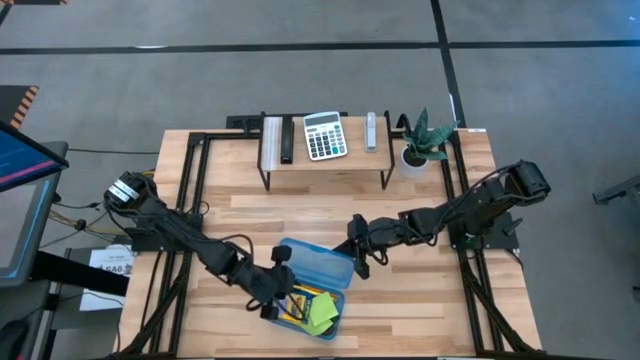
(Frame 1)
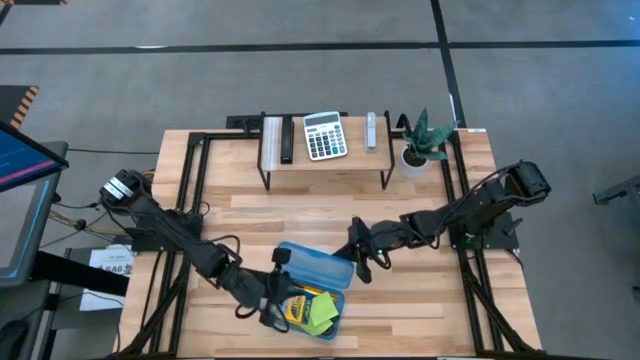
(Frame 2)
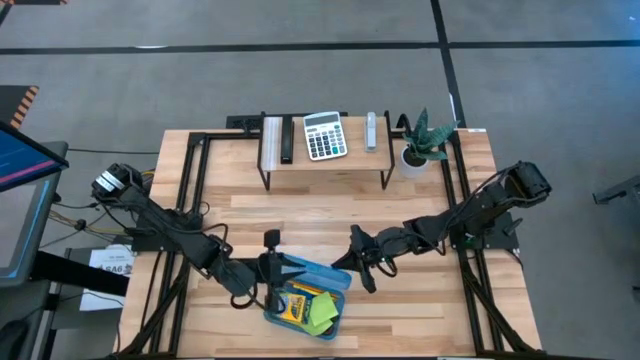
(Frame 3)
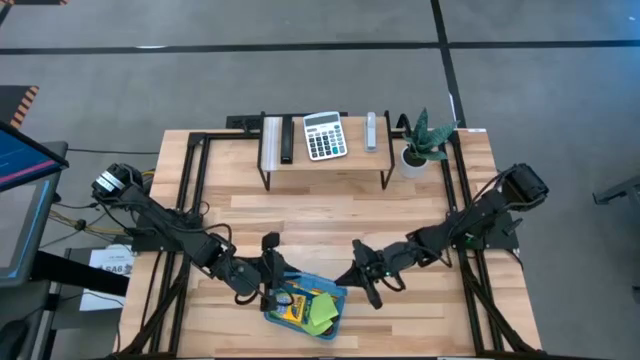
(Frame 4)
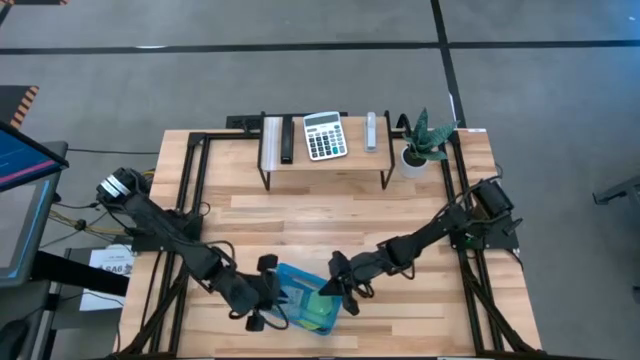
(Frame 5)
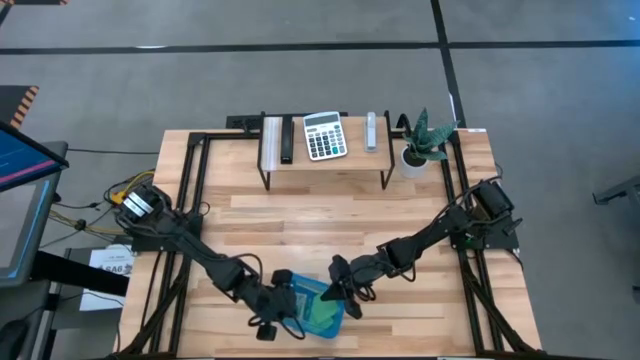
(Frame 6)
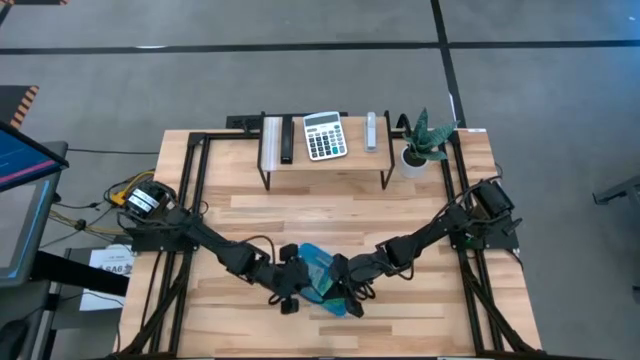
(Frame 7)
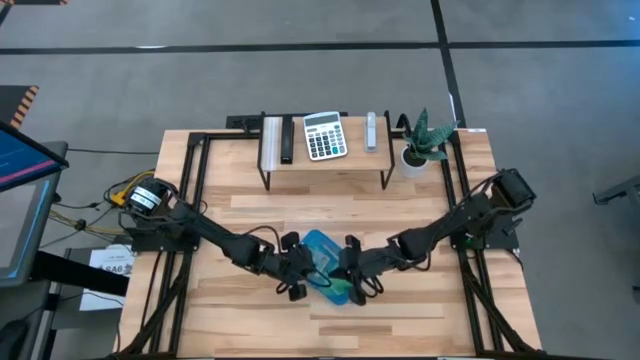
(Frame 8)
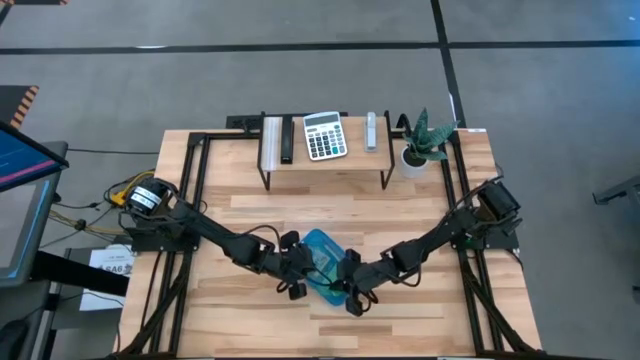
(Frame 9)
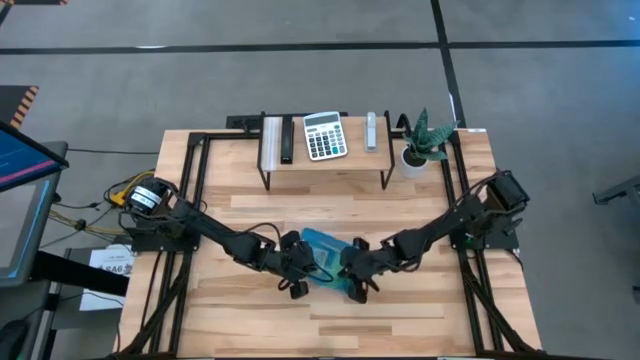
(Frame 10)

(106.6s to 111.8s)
Task: Pack school essentials
Close the supply box

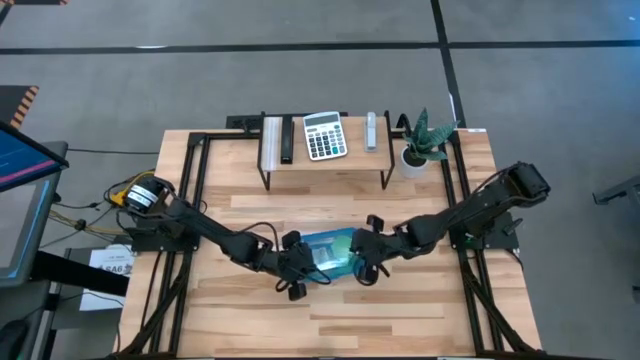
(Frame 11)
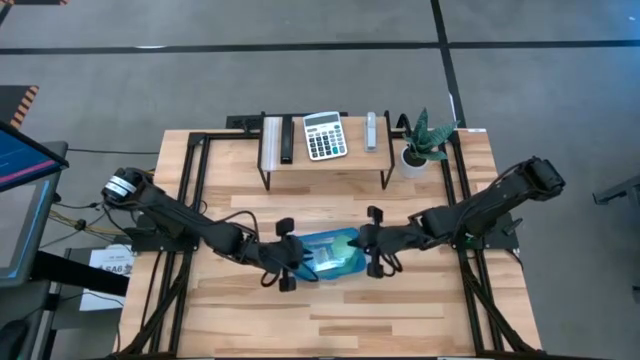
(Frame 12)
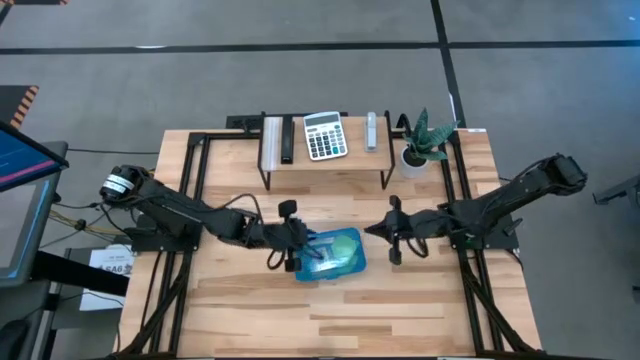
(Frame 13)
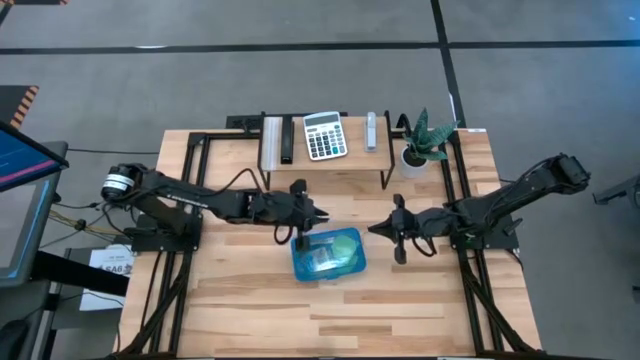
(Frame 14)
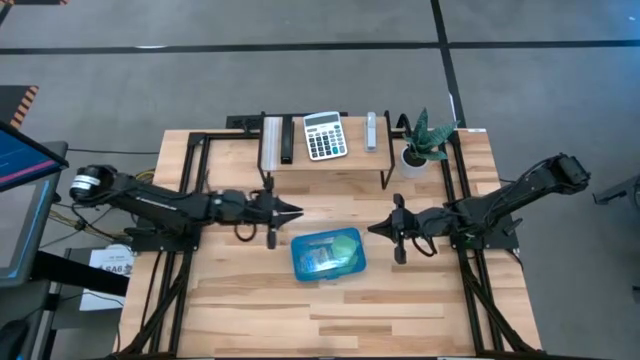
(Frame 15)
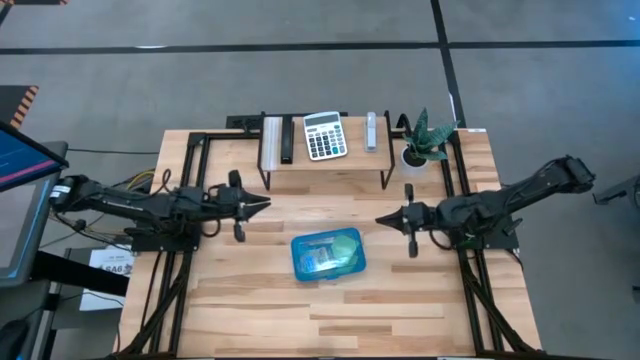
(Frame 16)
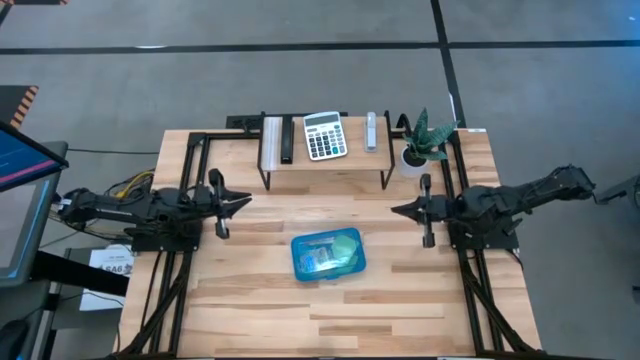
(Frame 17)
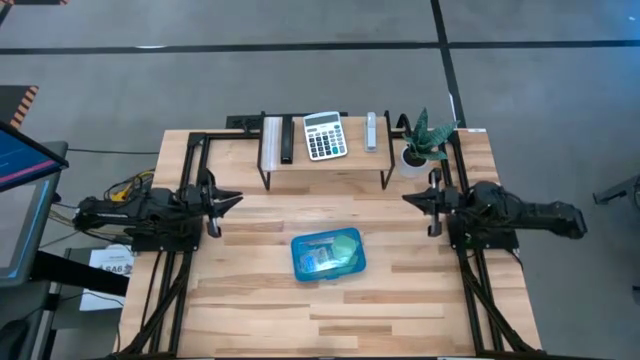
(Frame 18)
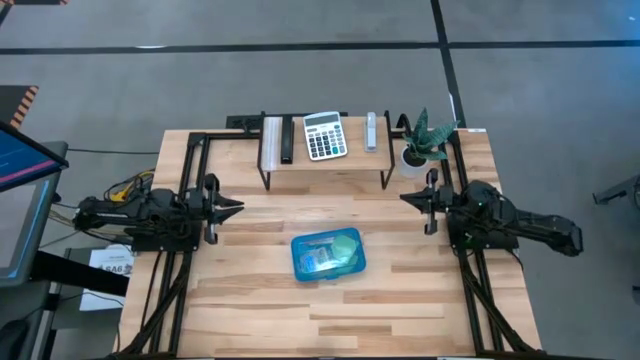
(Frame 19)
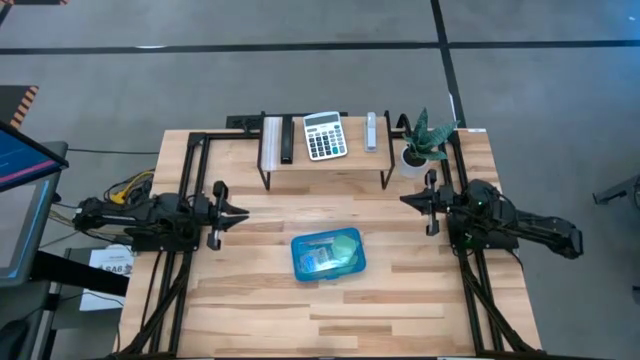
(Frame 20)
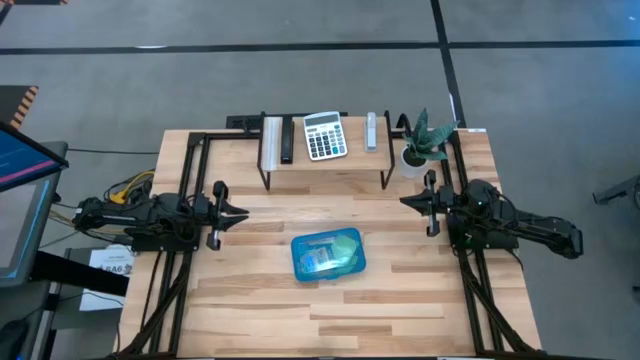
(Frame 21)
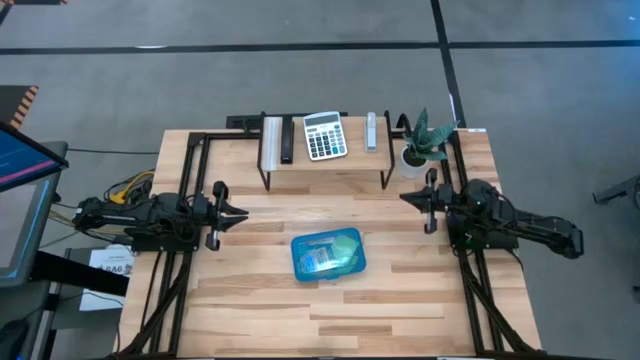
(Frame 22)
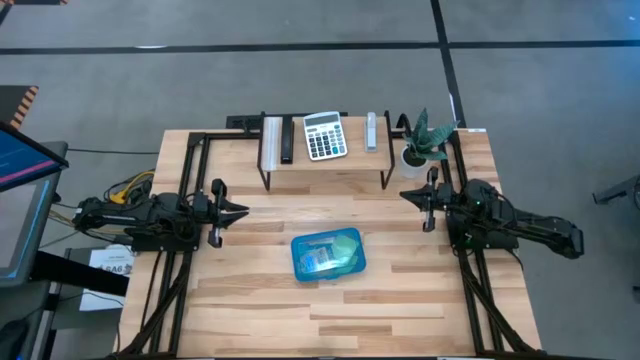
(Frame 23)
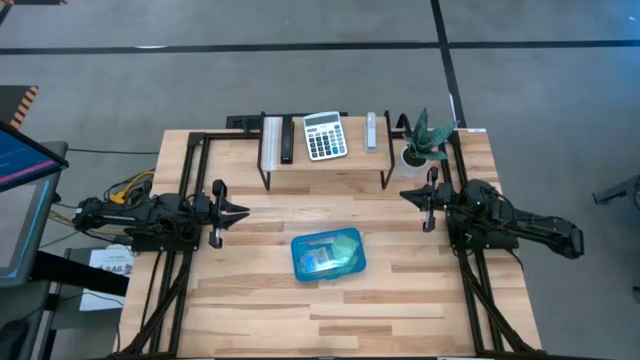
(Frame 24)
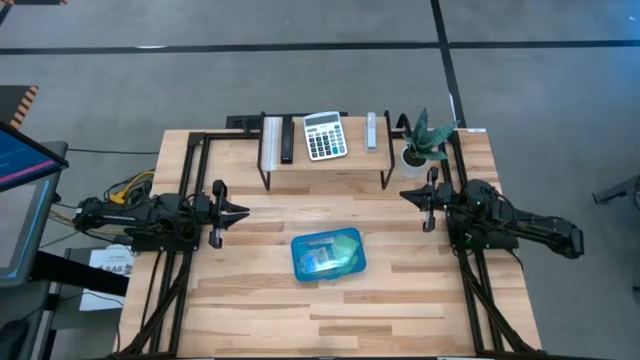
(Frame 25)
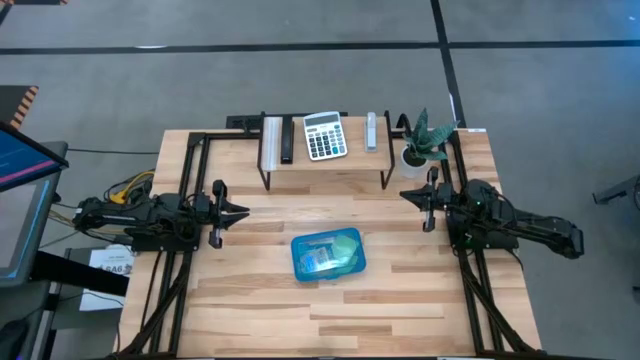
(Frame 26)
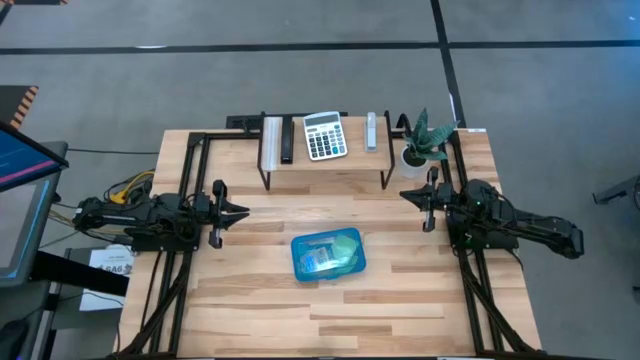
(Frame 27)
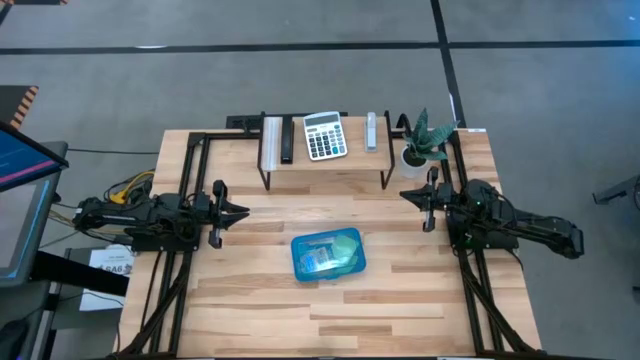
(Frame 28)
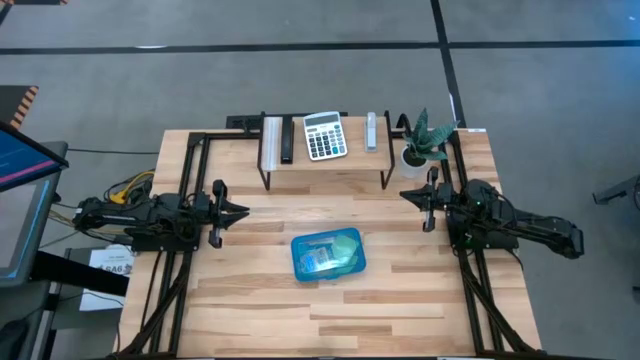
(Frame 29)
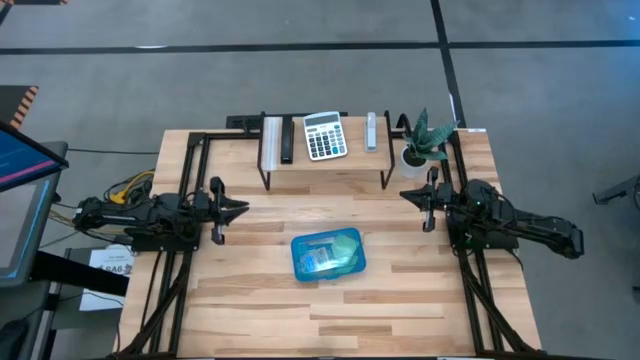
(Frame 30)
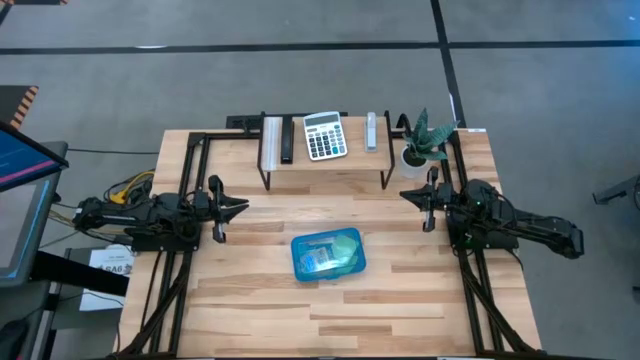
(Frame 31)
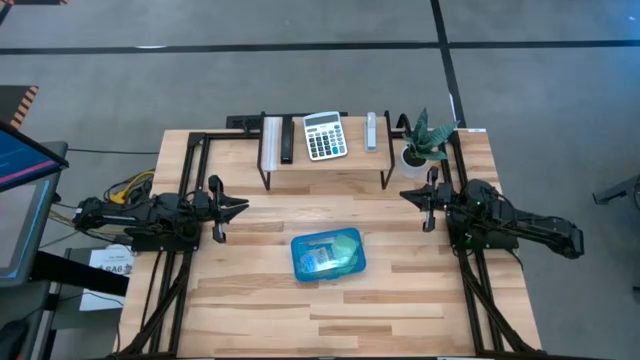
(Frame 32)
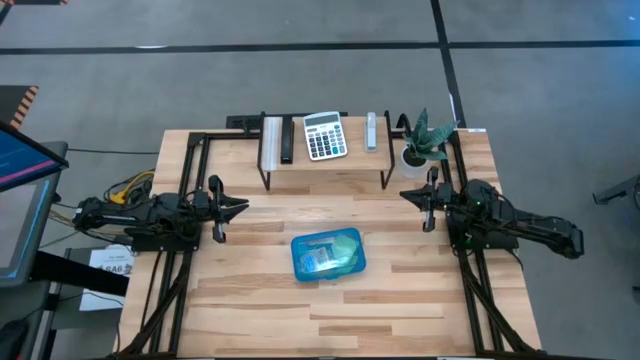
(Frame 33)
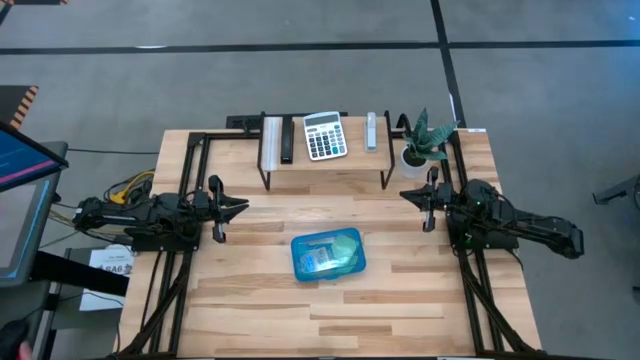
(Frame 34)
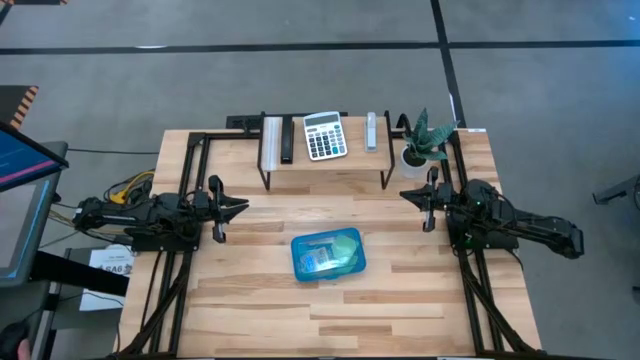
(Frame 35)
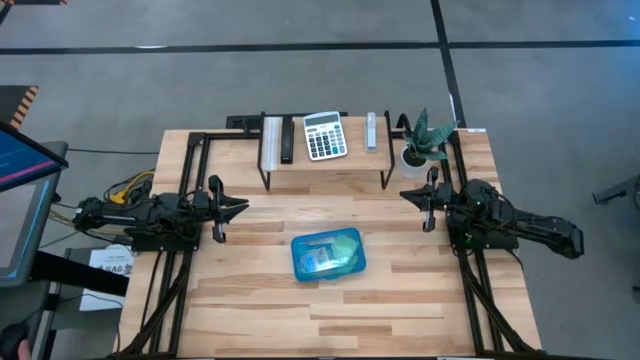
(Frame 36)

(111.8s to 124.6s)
Return to Home Position

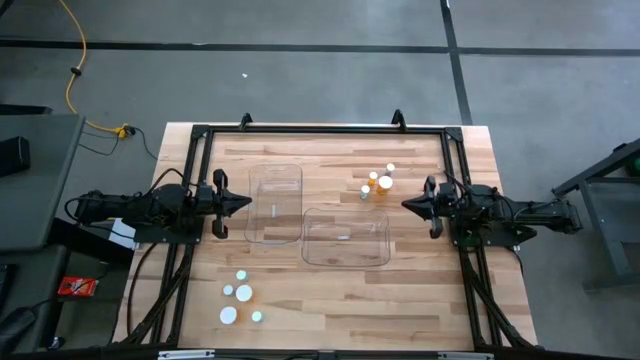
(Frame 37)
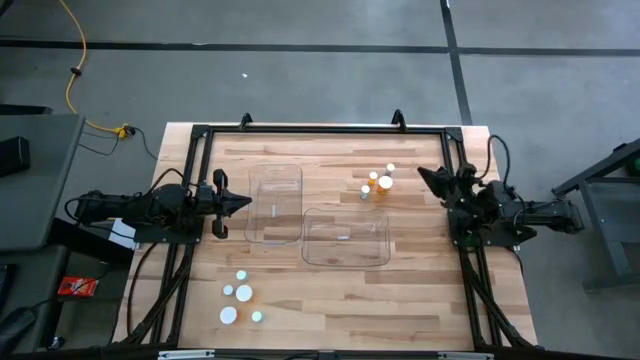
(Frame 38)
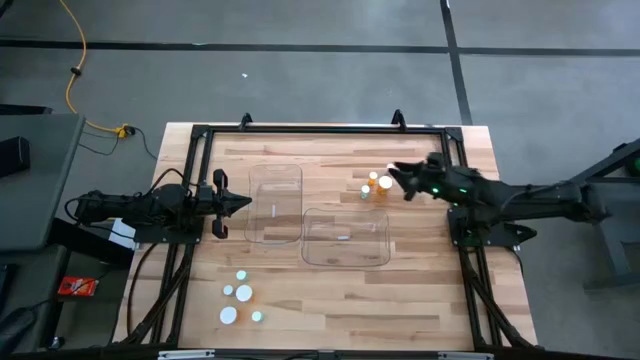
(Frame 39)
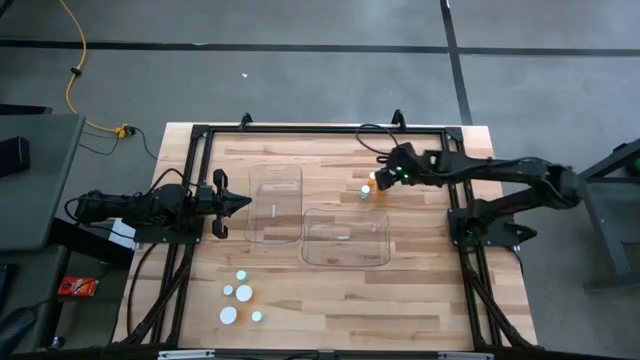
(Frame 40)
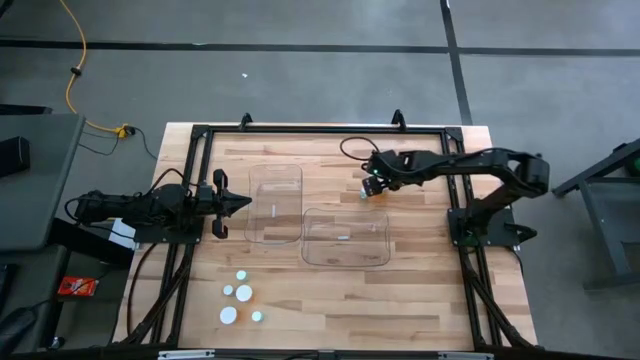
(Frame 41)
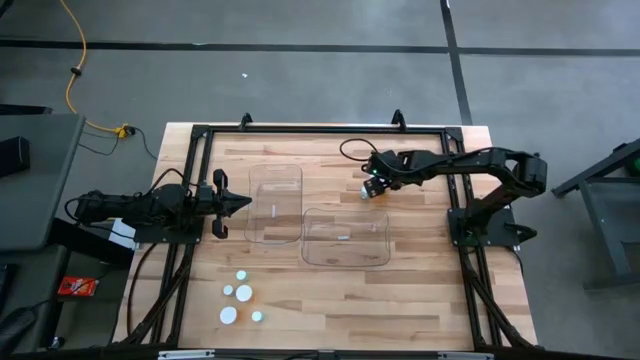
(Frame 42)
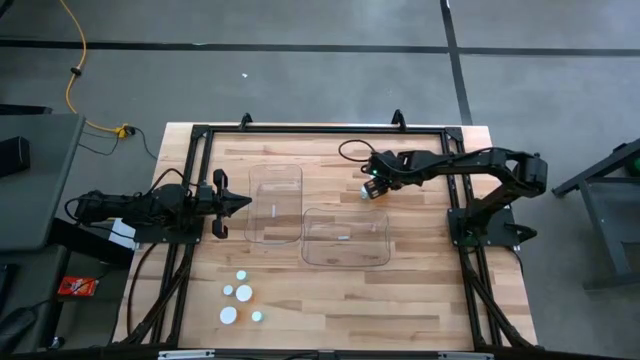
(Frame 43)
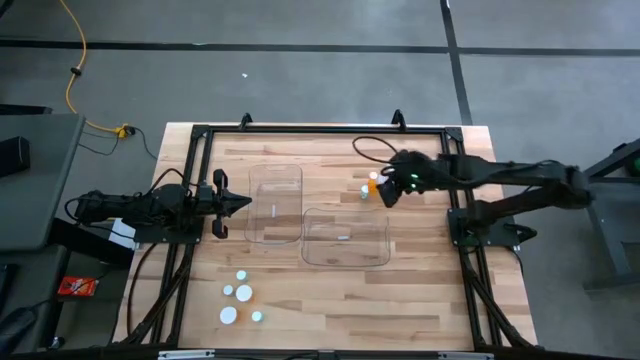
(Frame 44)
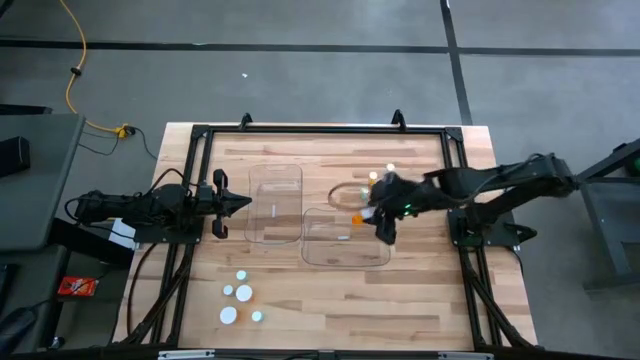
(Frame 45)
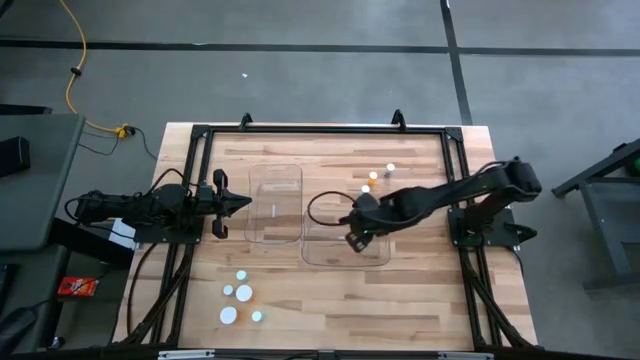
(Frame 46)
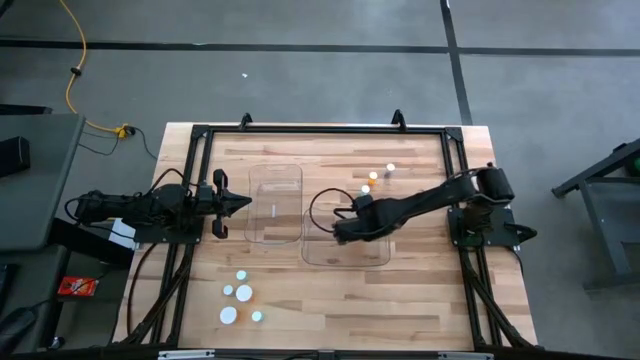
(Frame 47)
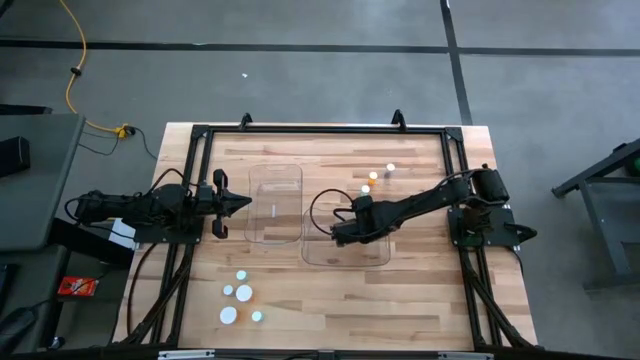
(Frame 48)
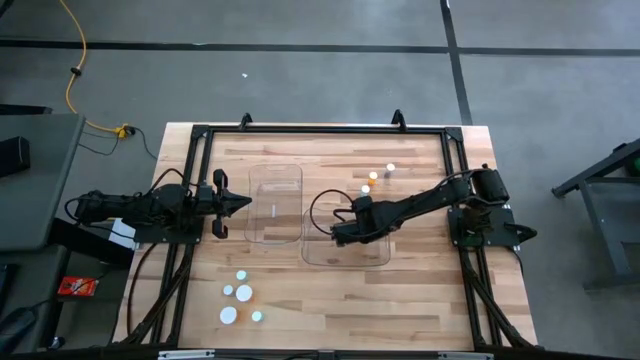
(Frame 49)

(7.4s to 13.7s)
Task: Pick and place medicine bottles into bin by pill shape (circle, oval)
Put the top orange capsule bottle into the right transparent bin
